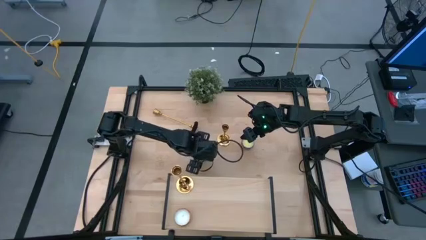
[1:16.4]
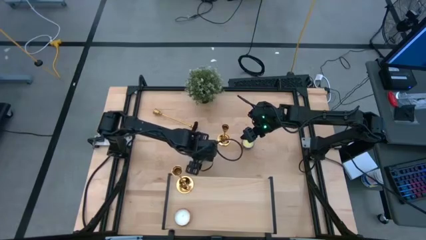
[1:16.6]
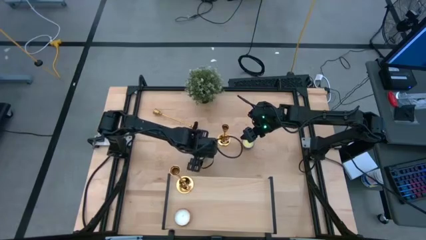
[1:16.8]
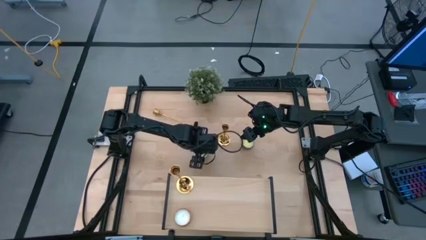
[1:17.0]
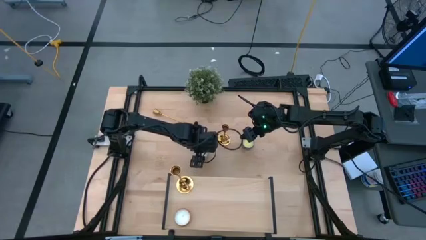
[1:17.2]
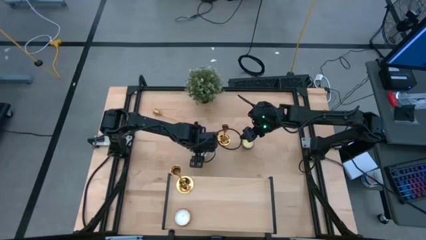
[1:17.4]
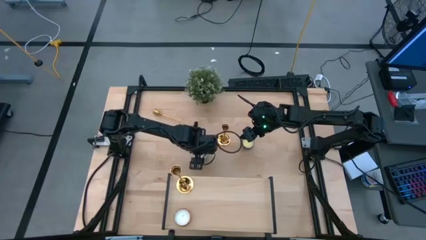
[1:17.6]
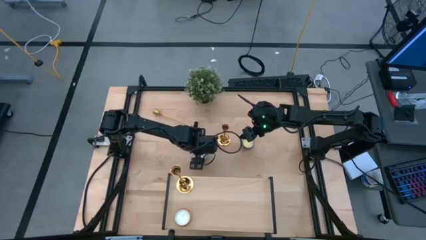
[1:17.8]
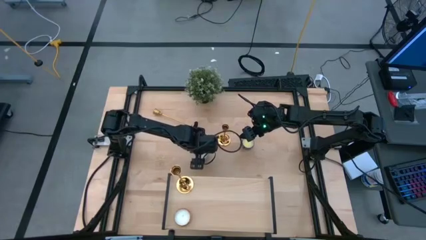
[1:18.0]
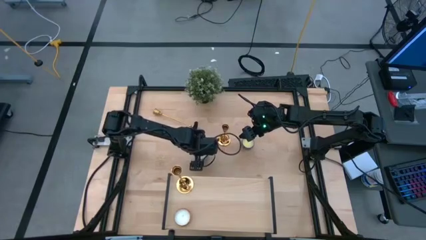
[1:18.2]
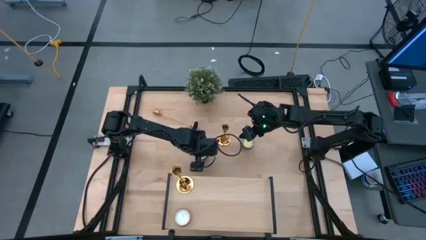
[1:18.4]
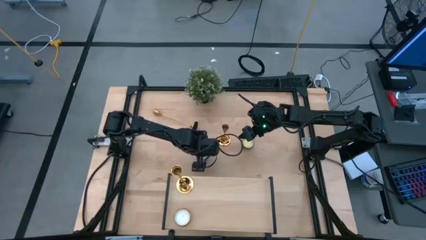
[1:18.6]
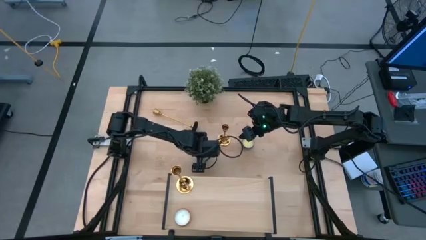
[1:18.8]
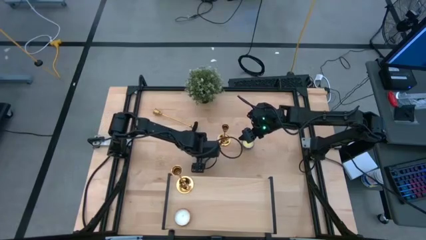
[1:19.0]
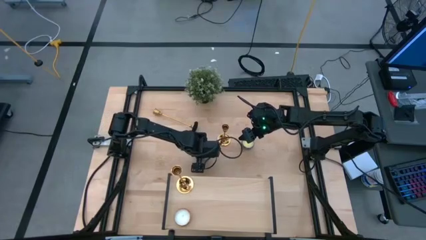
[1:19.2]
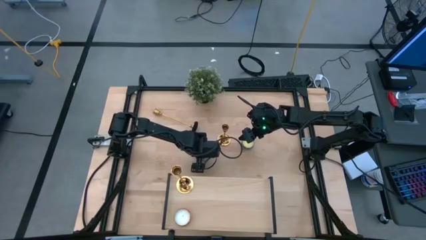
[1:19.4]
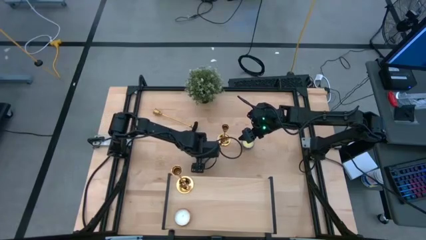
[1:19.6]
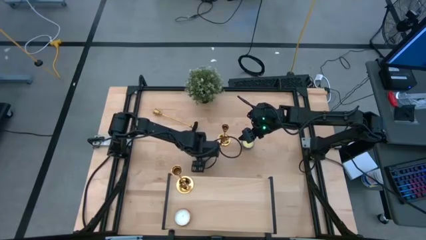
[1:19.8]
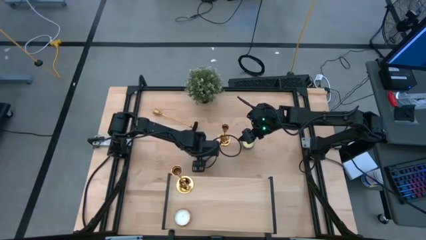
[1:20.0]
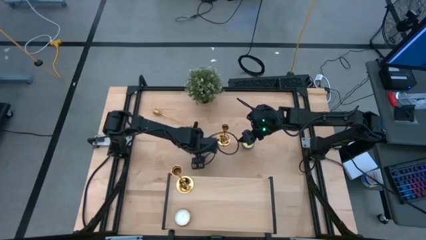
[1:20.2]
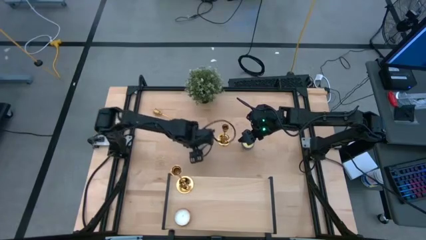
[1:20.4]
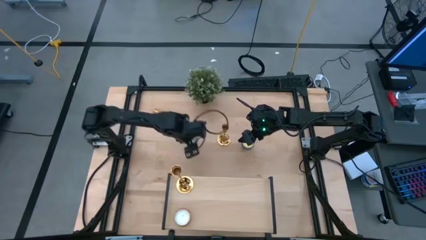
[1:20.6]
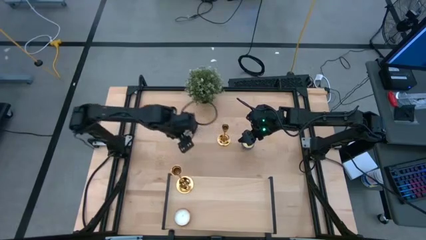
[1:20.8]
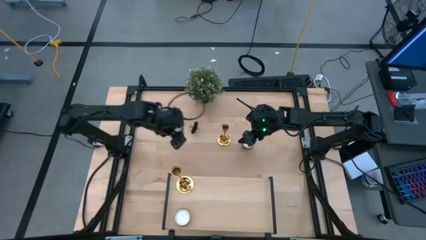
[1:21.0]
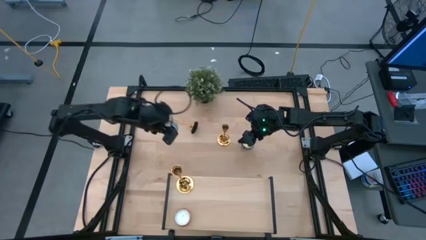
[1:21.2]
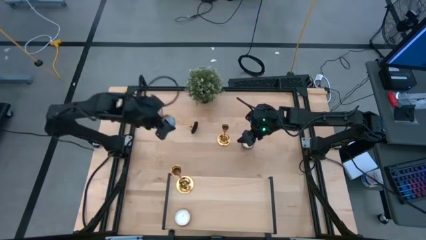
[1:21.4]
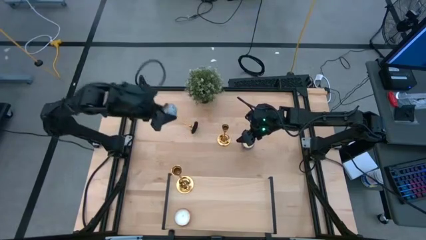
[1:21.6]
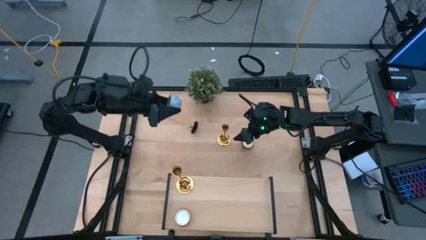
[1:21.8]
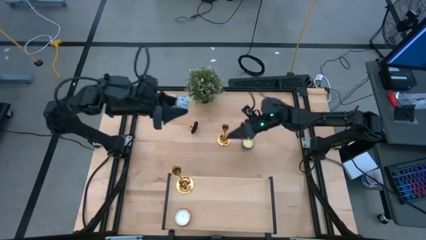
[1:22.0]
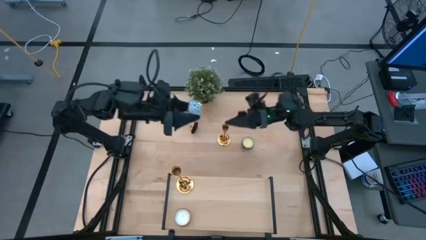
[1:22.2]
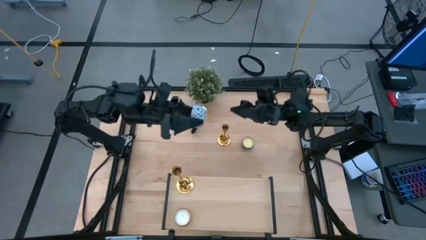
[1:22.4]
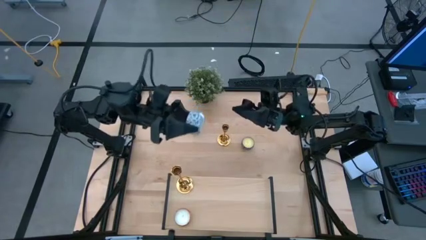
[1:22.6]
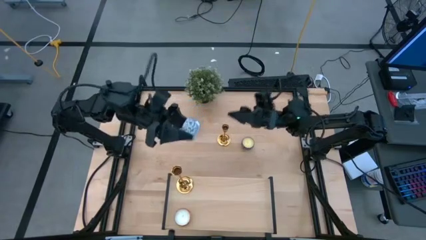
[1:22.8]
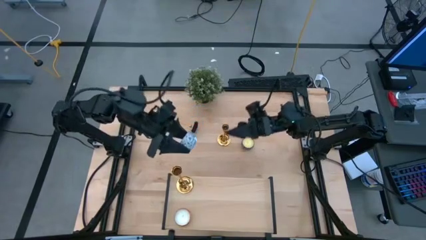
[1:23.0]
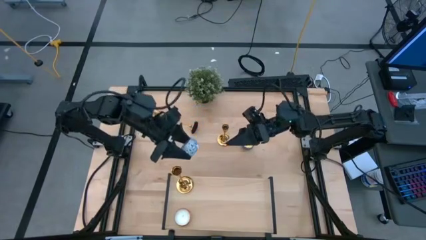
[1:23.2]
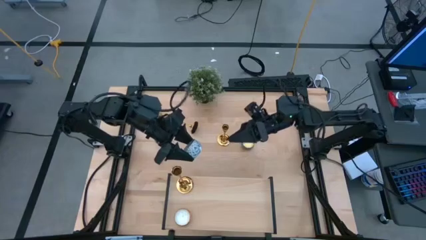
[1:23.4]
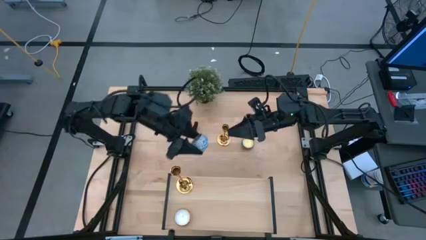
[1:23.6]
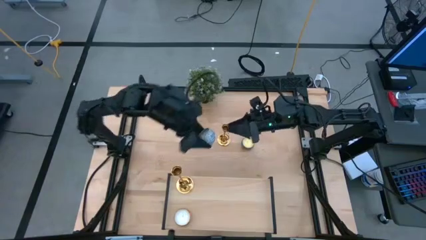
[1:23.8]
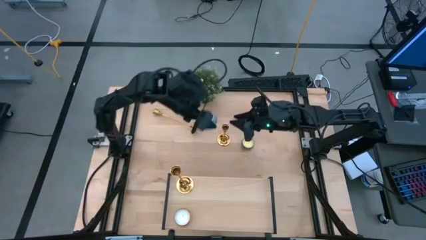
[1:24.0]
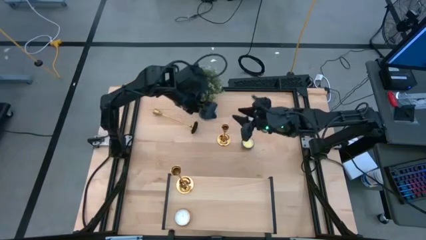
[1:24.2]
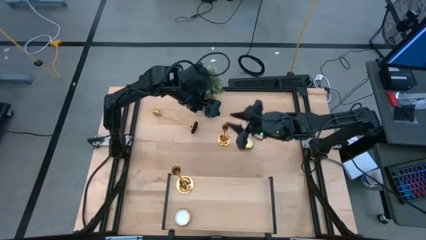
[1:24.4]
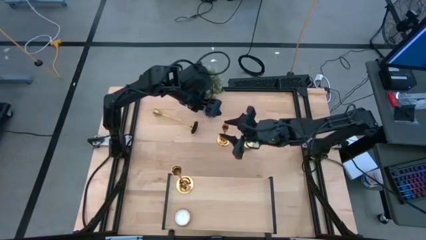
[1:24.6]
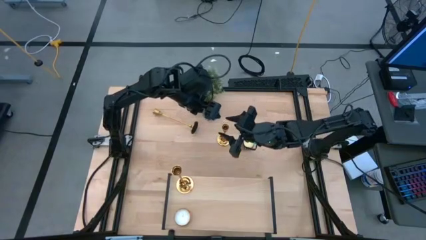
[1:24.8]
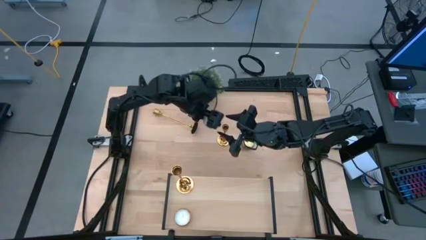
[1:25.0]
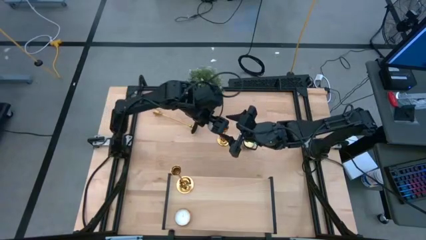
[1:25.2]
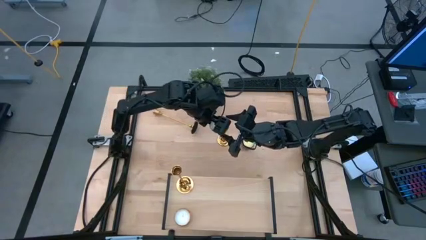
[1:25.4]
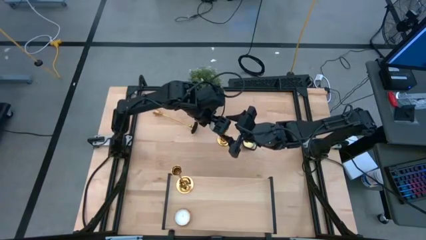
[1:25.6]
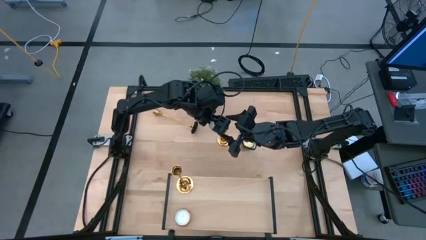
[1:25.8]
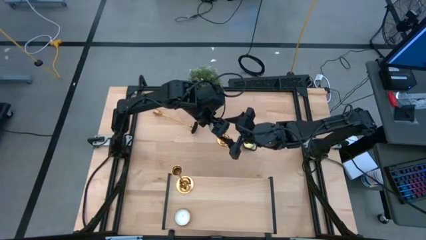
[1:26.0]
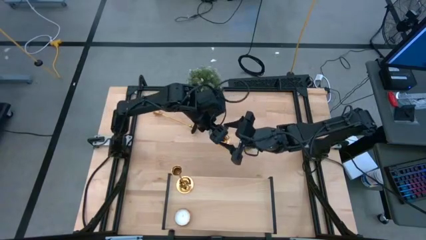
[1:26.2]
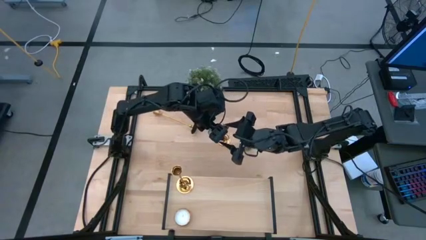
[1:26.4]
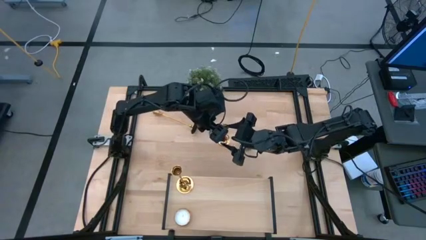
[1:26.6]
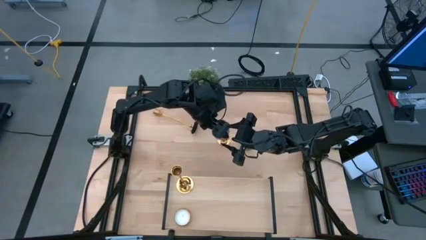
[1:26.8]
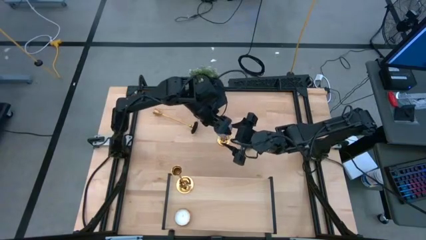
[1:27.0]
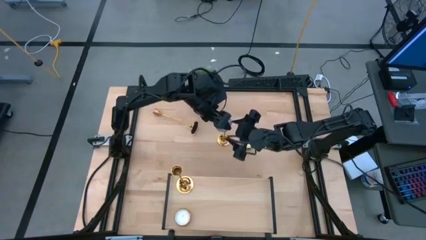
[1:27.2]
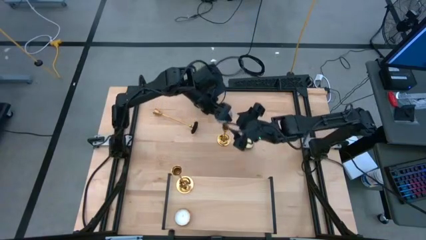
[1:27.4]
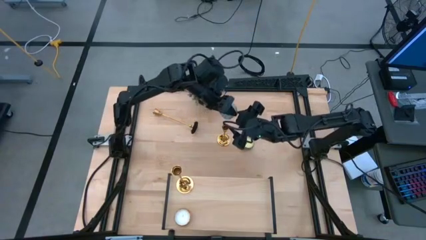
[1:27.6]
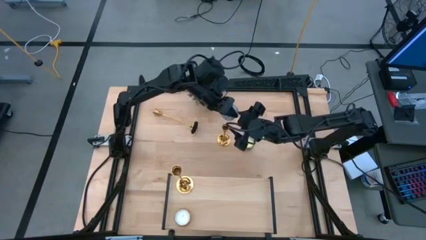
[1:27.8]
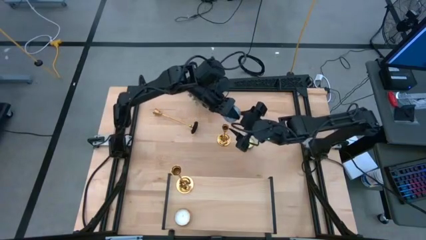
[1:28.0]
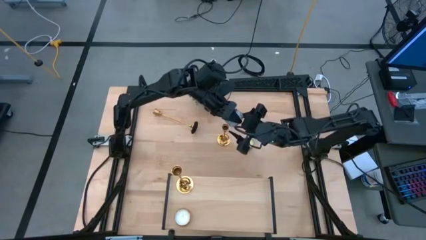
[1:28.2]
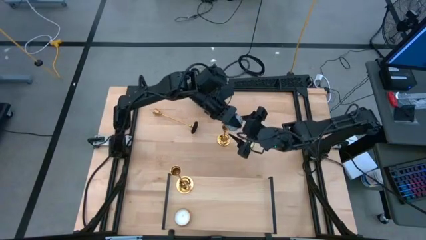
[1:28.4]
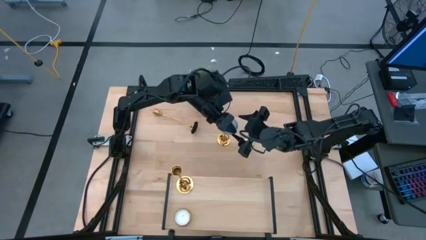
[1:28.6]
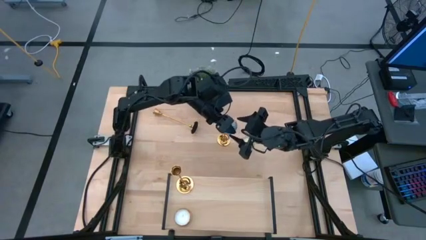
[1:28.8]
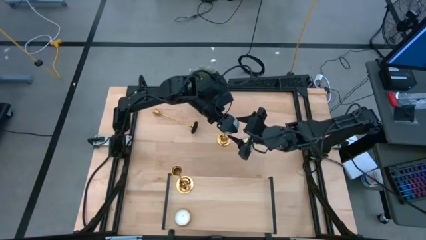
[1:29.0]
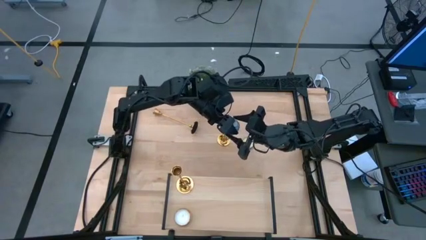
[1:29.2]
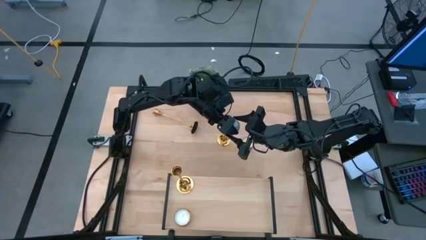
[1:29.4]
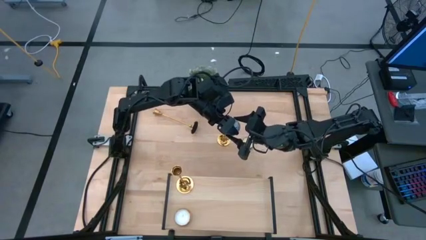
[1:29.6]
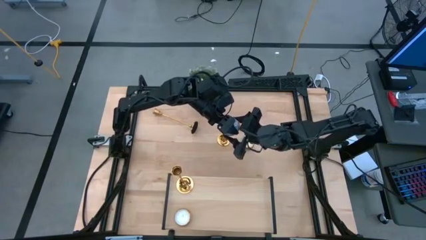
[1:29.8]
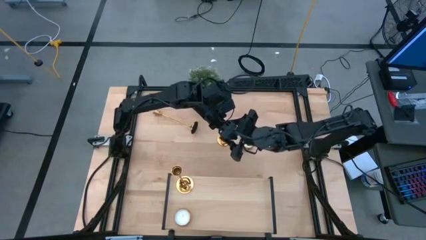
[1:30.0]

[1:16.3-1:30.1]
Task: Pick & Place candle stick holders
Put the light blue scented candle on the shelf

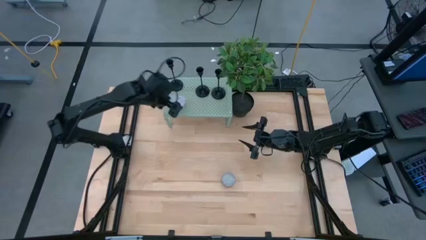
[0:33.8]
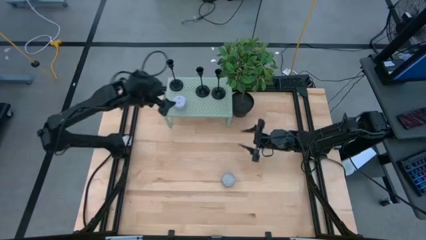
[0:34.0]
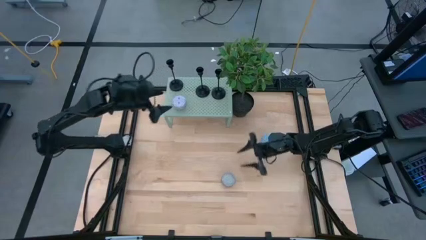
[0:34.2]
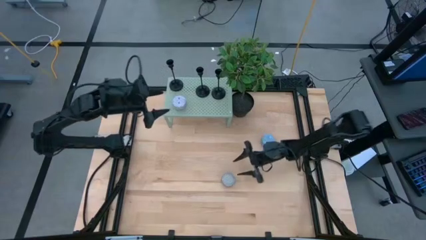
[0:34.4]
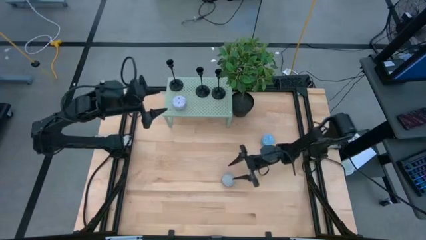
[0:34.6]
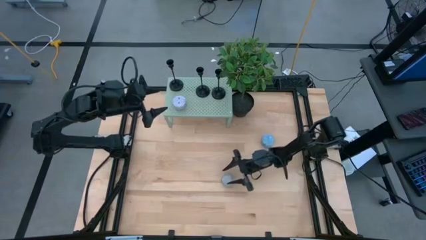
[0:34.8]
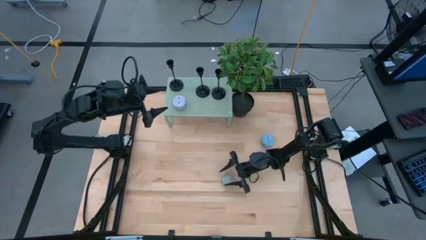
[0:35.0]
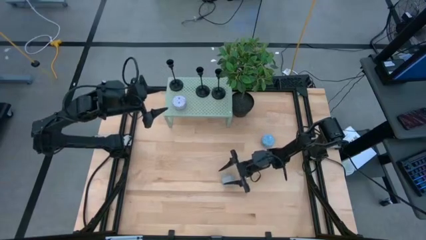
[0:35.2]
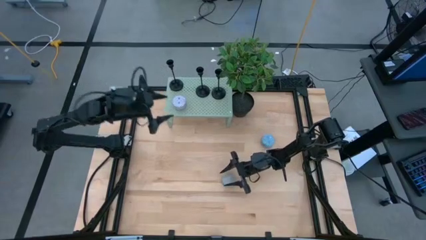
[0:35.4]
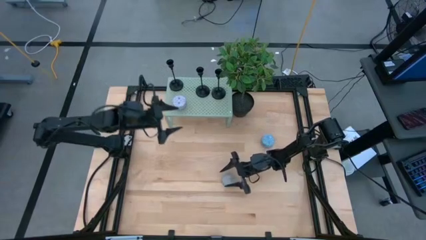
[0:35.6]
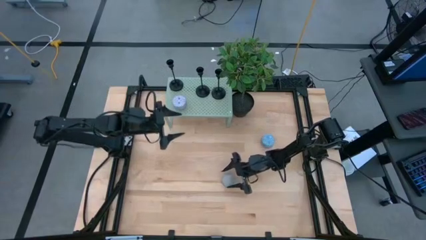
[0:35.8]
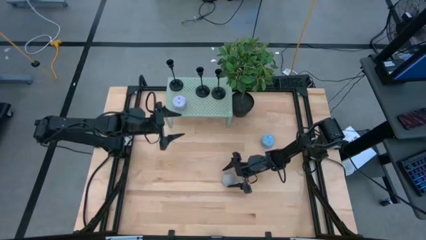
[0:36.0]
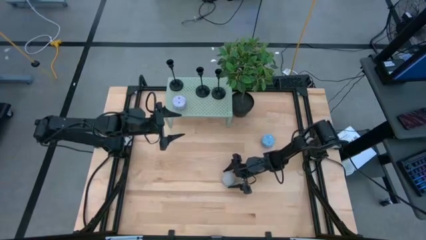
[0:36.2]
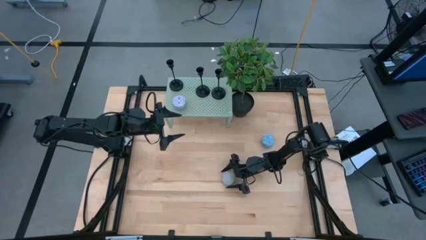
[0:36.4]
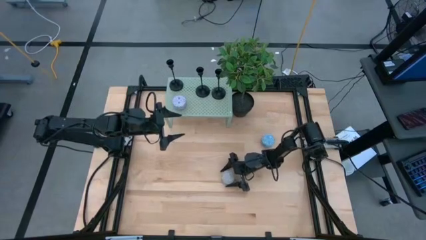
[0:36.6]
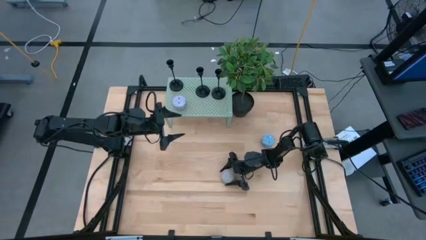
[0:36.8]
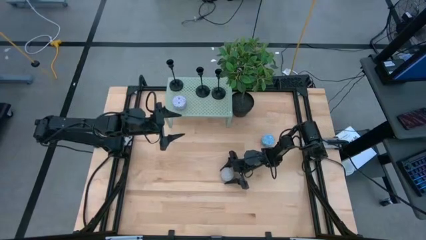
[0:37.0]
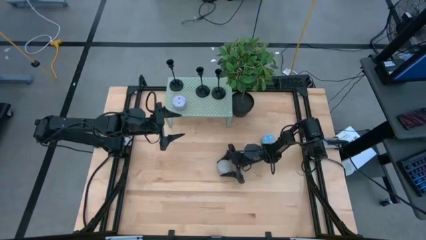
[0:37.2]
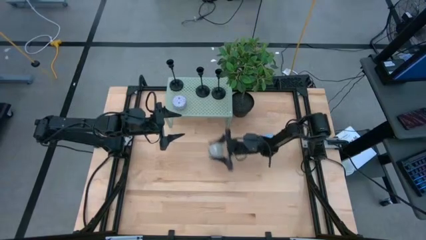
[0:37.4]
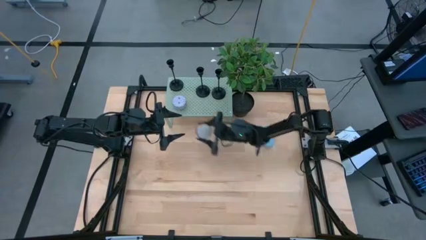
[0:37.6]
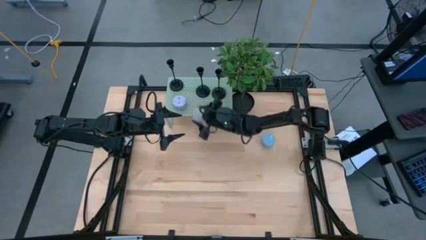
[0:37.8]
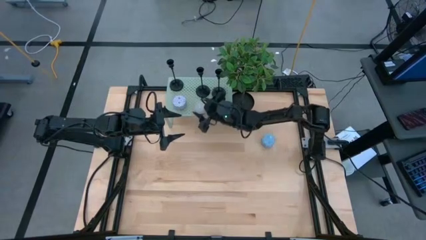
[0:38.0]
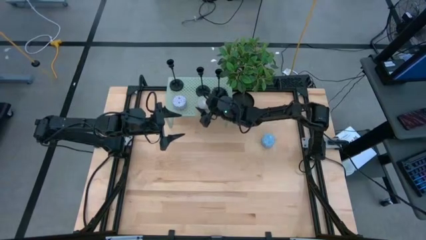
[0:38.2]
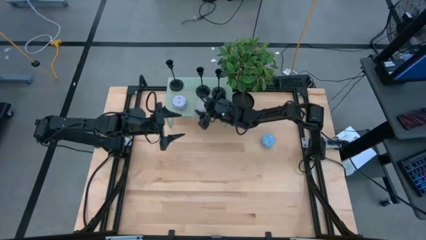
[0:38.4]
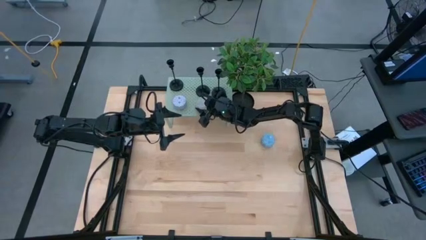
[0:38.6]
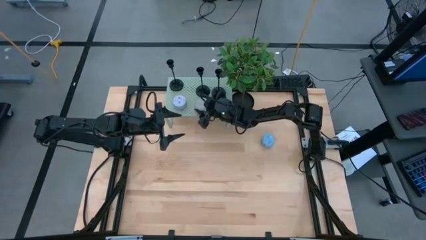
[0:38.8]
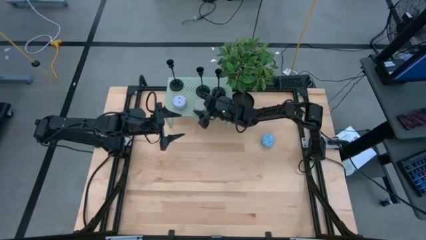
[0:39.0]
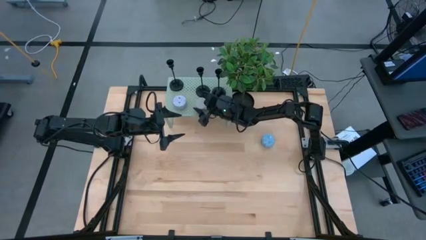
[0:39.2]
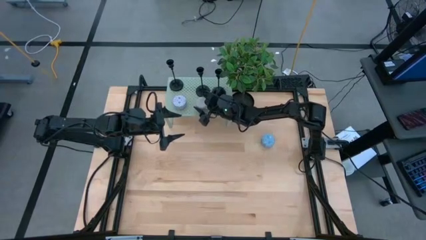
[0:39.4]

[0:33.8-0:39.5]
Task: Pick & Place candle stick holders
Put the blue scented candle on the shelf aligned with the red scented candle
